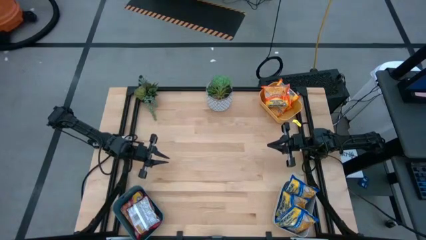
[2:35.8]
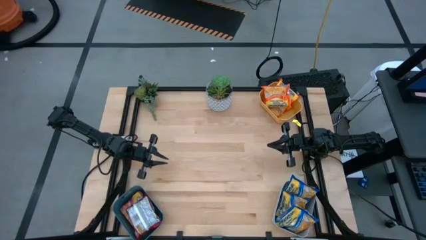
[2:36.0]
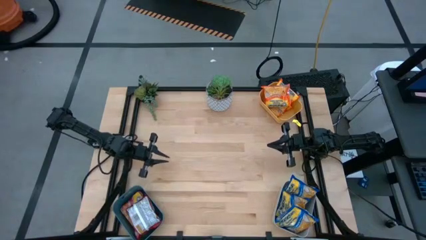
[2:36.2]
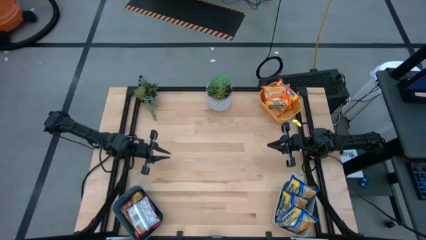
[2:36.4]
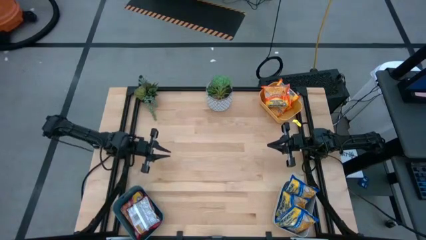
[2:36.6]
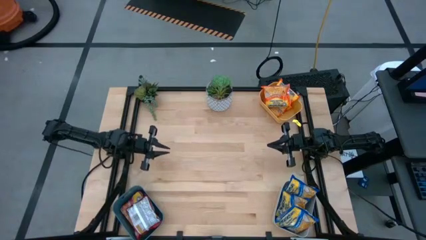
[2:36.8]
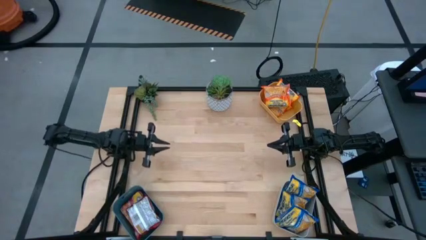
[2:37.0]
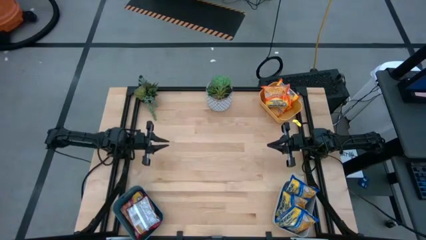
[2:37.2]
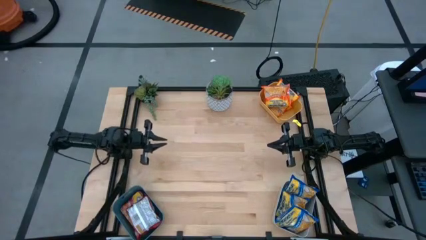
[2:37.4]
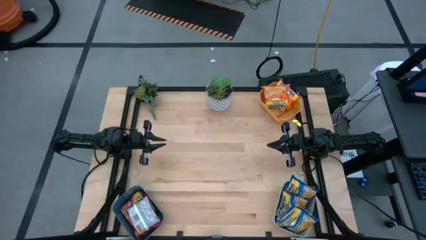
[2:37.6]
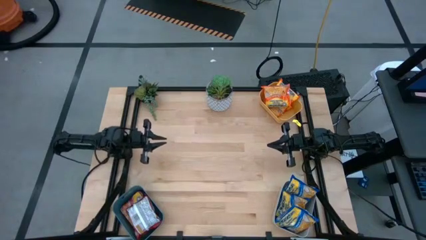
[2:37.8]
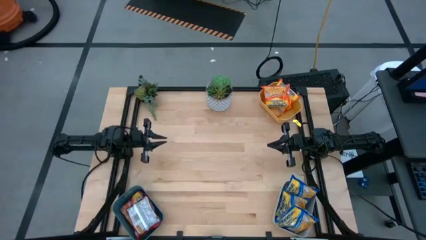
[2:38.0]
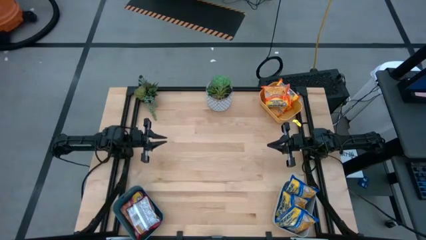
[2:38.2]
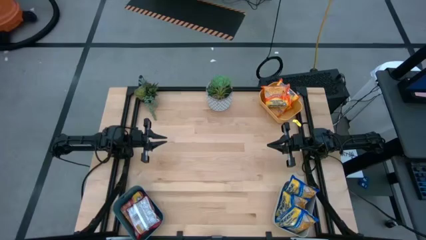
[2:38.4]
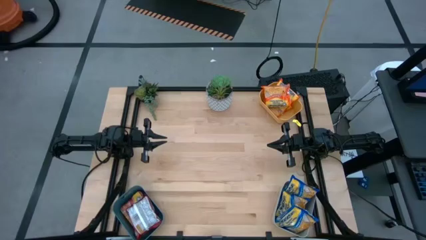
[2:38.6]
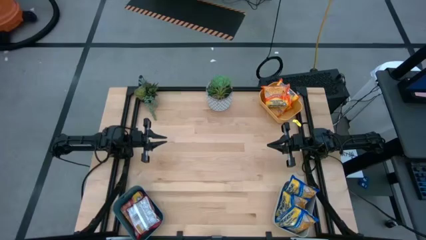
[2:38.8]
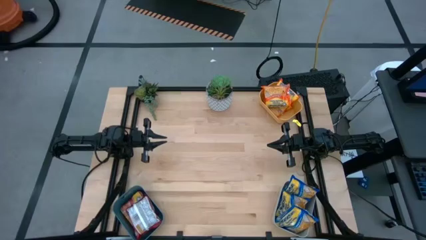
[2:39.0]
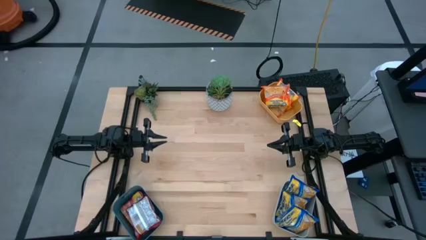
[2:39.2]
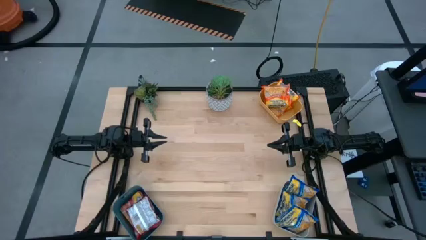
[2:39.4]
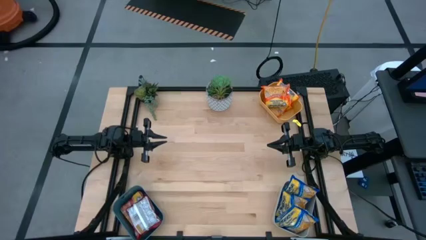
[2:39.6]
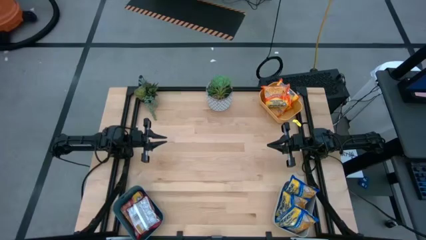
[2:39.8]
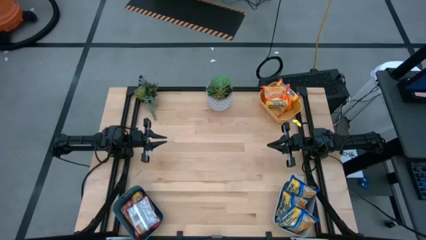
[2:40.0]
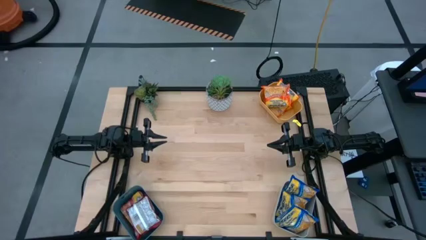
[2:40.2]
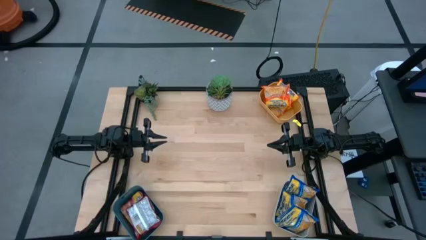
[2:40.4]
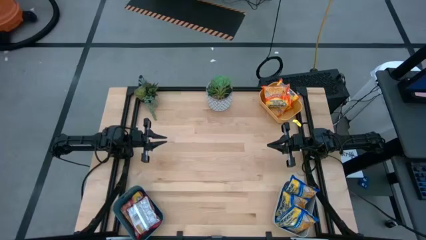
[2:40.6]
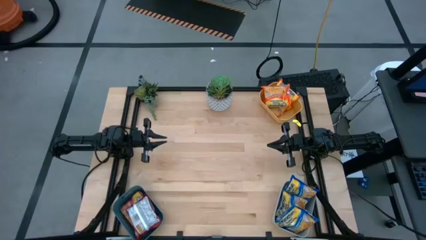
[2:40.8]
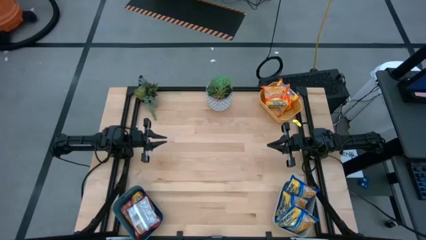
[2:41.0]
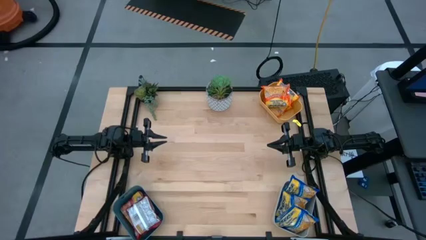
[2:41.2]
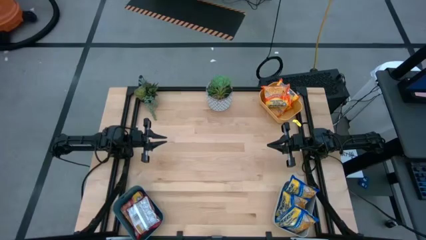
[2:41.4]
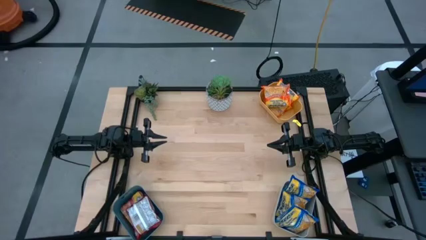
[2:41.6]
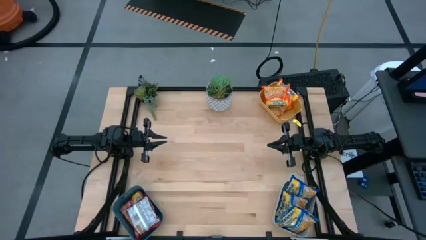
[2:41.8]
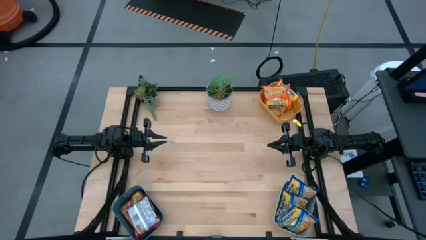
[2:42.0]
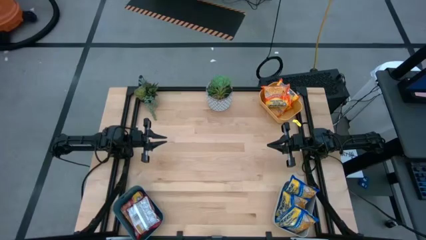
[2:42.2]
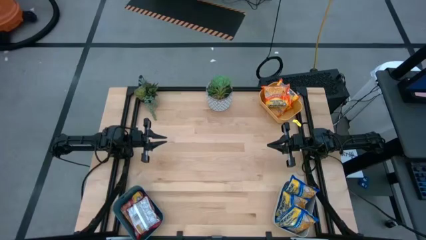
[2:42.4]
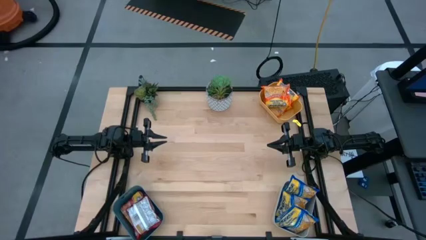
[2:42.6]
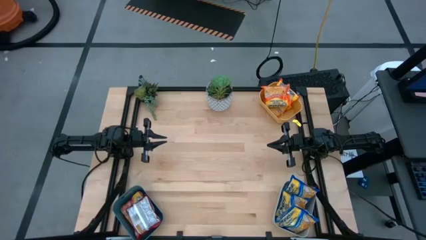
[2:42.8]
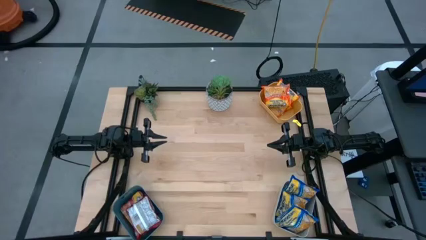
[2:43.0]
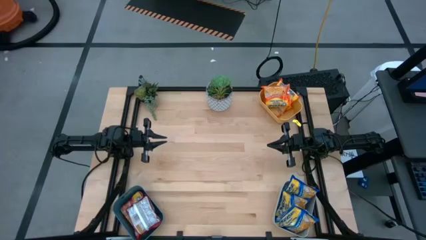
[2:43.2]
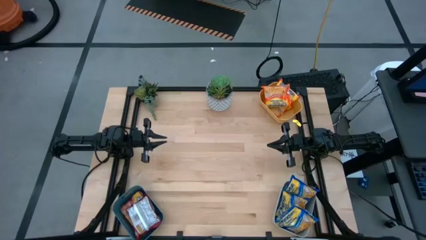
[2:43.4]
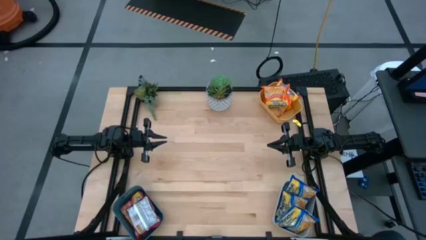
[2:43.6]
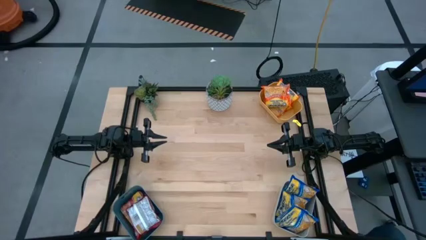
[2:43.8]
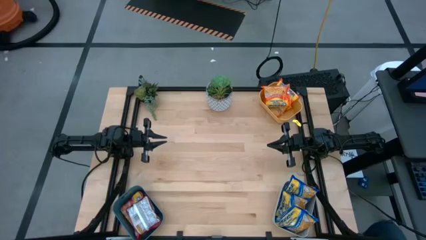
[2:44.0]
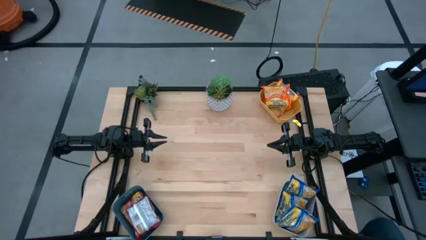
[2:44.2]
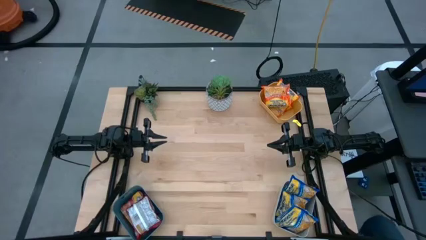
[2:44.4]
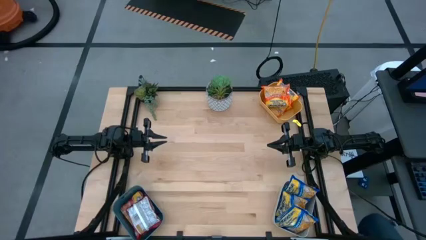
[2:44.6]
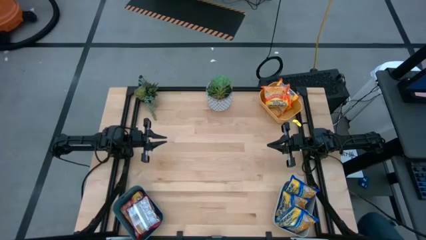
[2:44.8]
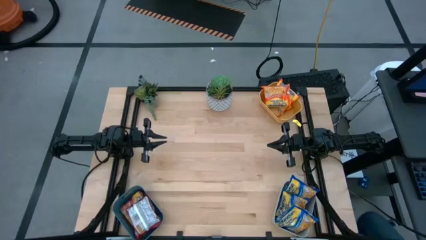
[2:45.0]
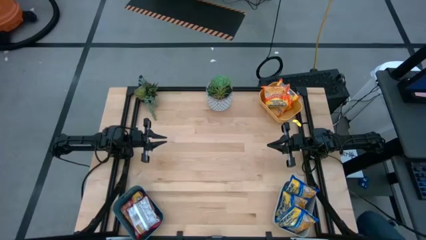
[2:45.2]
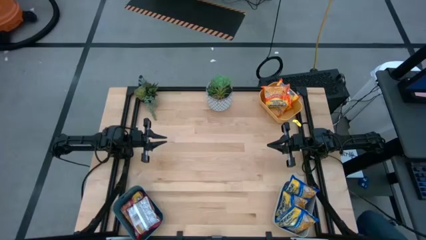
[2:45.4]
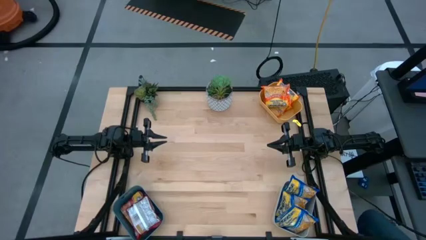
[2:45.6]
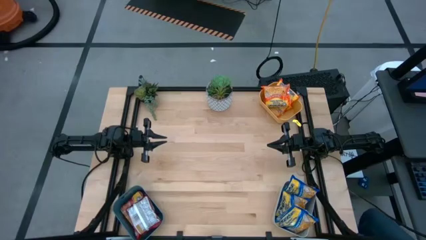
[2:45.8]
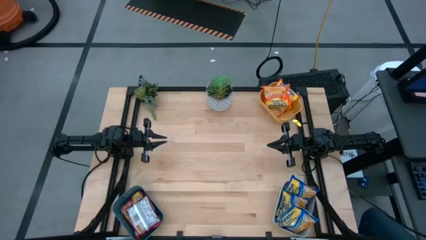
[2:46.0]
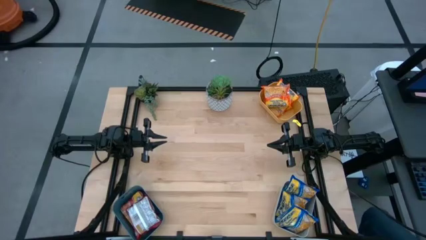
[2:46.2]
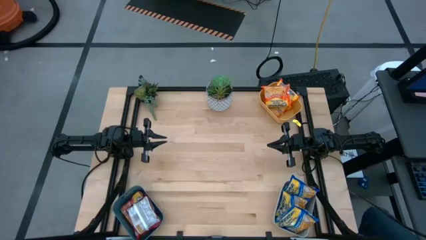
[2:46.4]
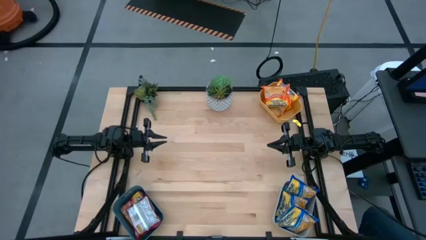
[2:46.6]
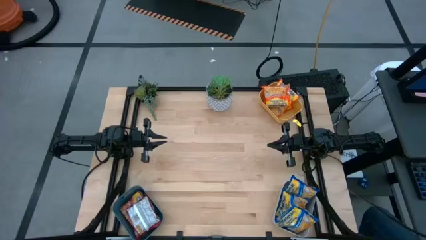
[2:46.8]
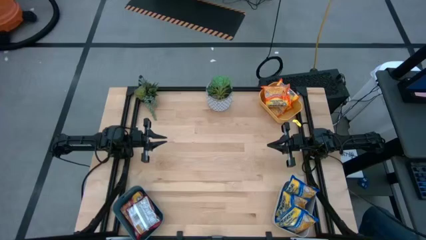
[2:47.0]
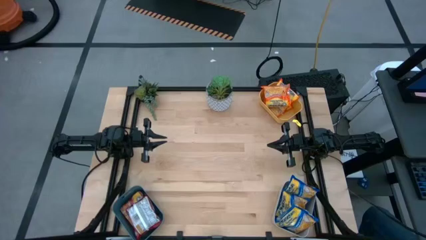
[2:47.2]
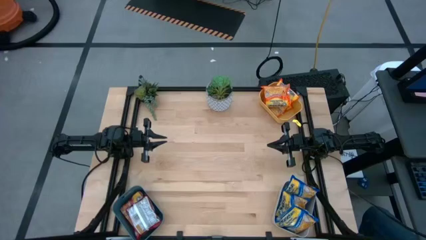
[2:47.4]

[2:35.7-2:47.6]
Task: Sort Maruchan noodles
Return to Home Position

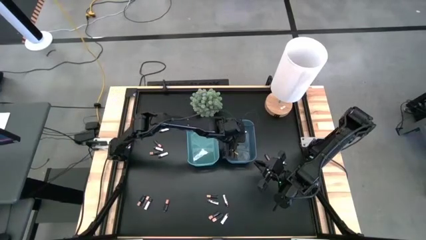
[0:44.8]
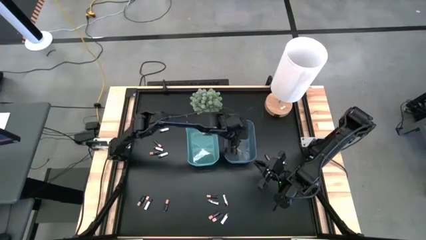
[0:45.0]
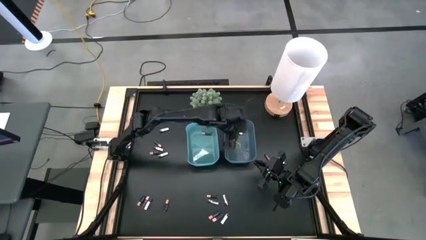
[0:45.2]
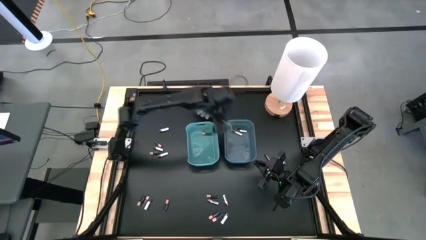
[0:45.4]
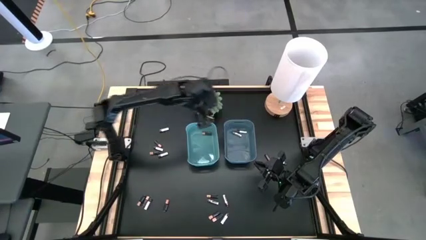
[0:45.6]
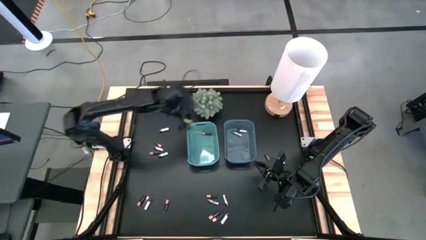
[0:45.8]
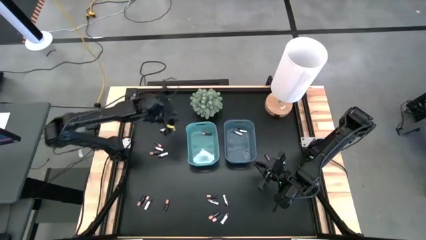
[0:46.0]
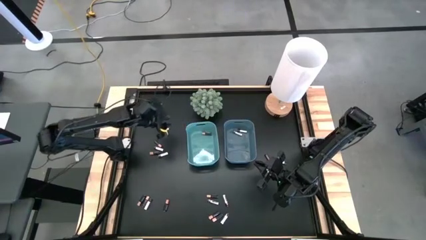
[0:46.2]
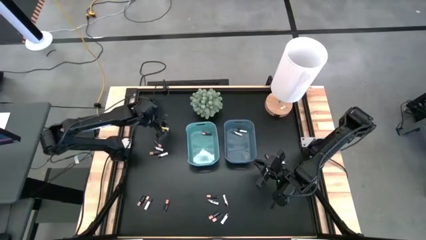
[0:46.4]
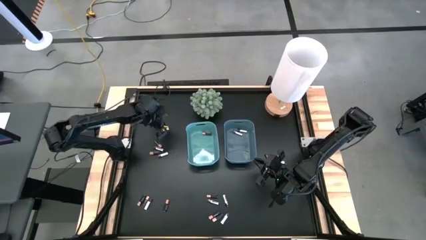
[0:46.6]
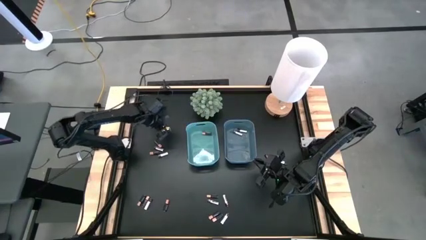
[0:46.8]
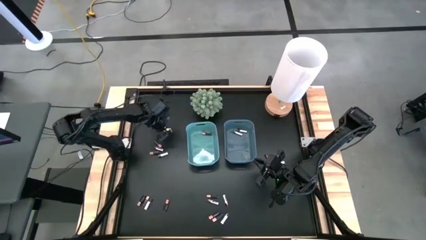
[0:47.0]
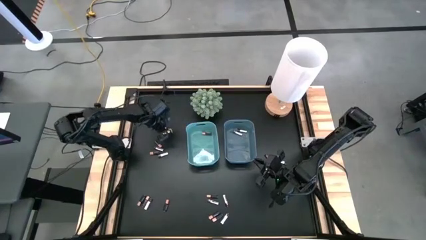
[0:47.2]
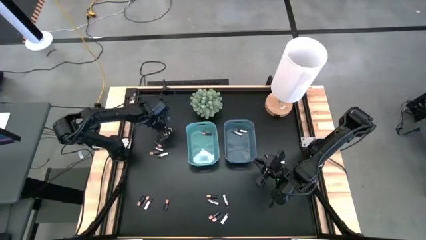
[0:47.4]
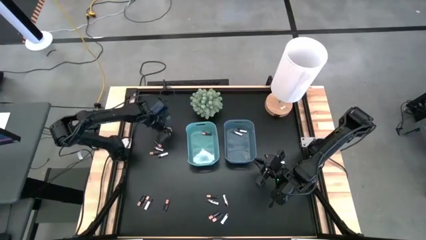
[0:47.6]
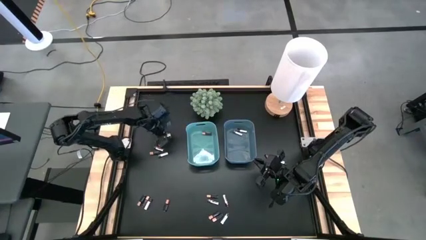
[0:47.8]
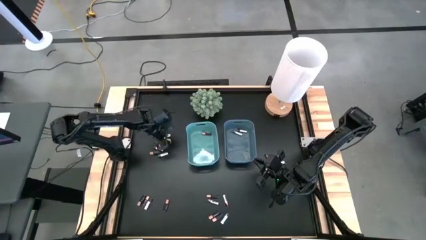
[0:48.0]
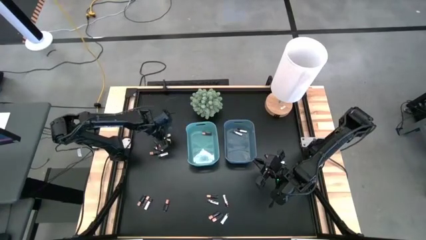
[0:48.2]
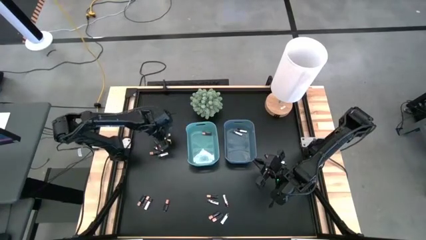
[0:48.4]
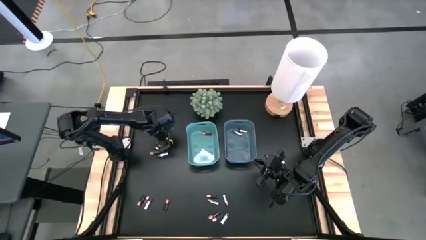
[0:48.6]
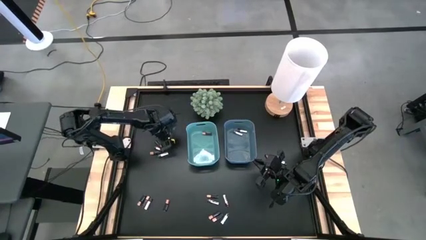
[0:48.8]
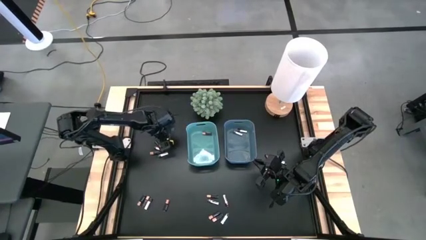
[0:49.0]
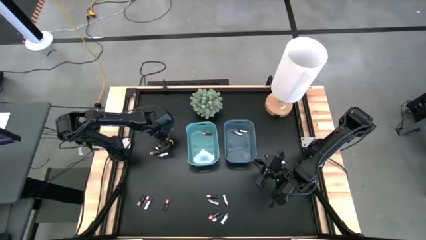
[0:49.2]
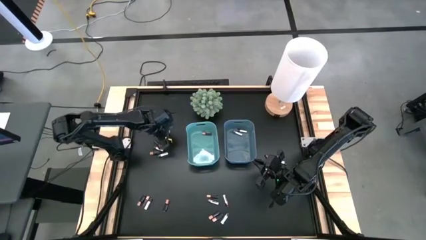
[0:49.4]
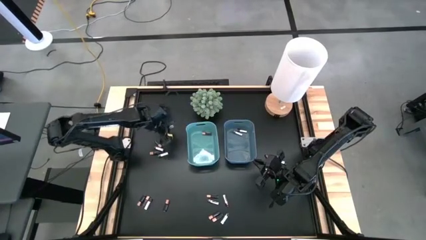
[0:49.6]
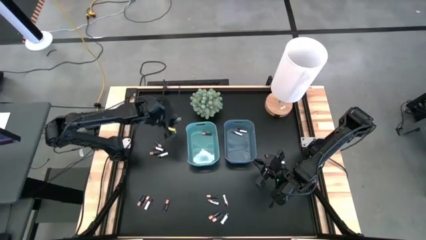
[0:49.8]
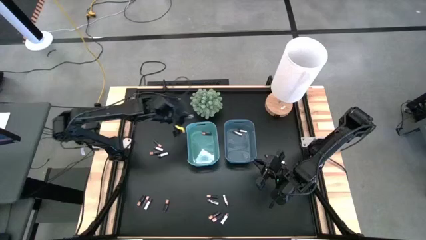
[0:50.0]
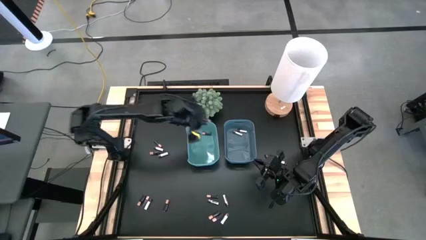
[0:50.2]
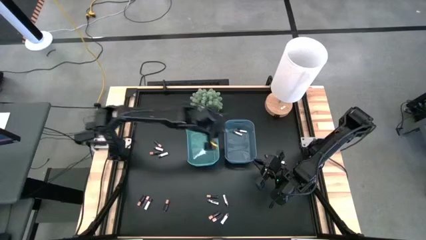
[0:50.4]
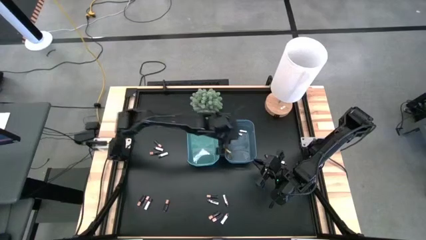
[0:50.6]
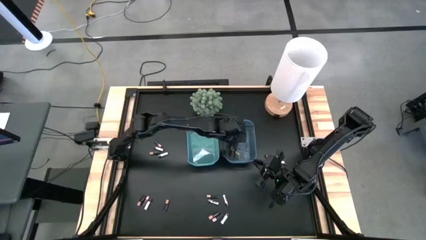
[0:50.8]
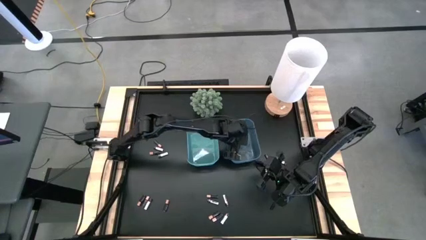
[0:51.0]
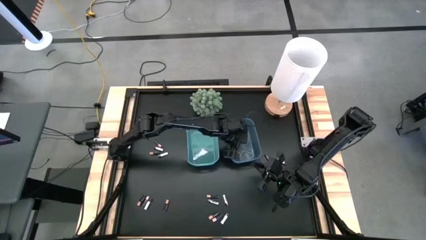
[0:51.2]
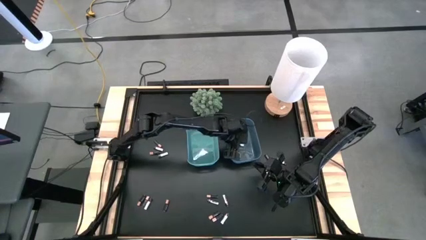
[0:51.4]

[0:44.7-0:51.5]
Task: Sort batteries
Put the white battery into the blue bin
